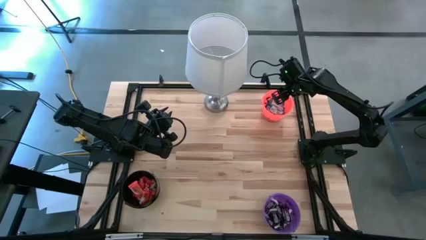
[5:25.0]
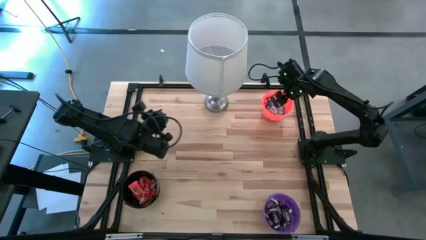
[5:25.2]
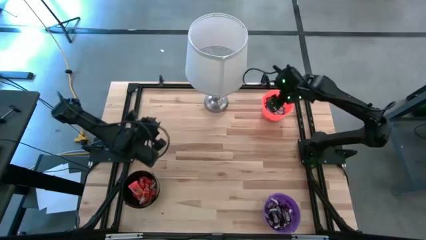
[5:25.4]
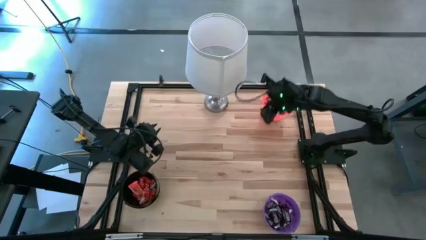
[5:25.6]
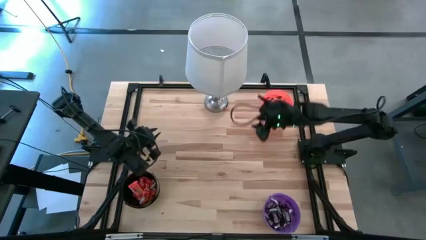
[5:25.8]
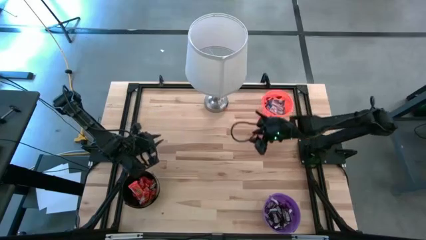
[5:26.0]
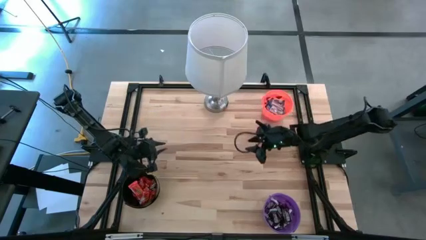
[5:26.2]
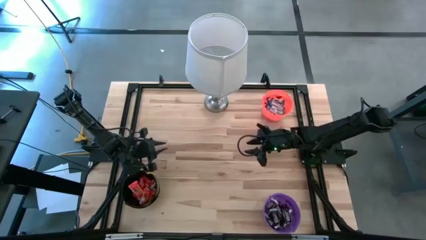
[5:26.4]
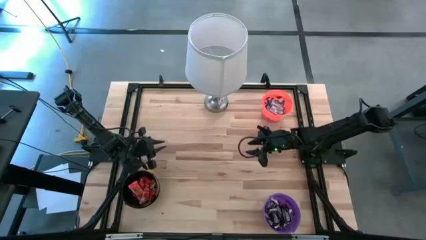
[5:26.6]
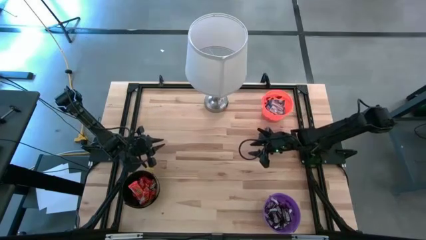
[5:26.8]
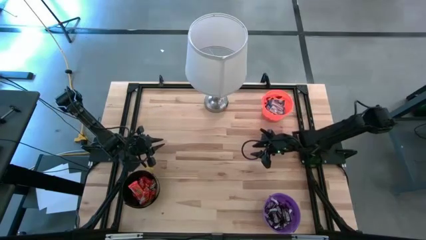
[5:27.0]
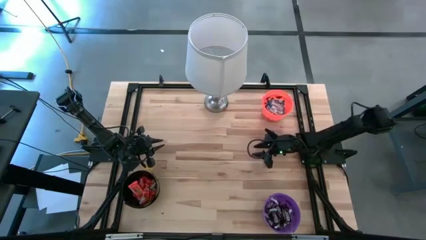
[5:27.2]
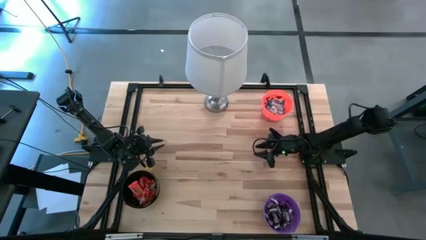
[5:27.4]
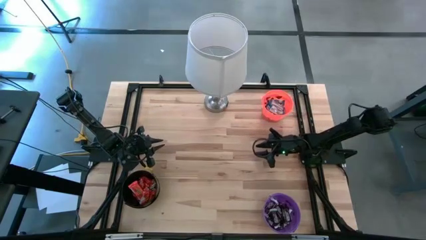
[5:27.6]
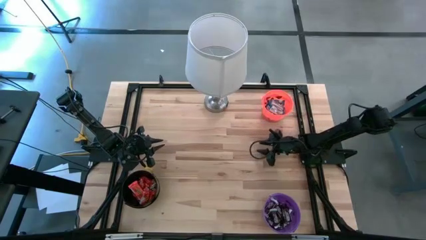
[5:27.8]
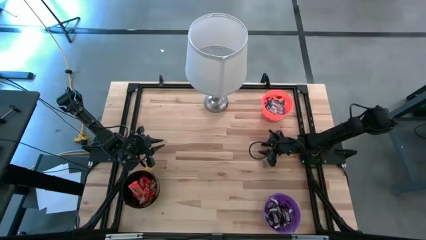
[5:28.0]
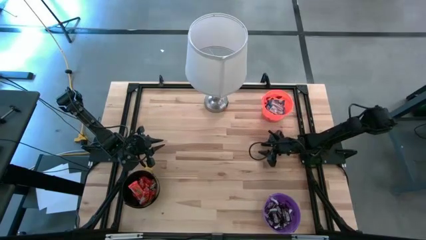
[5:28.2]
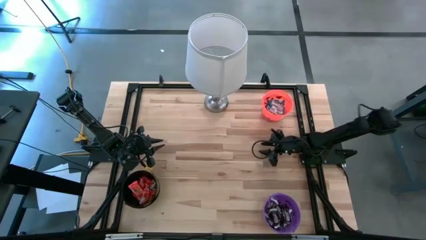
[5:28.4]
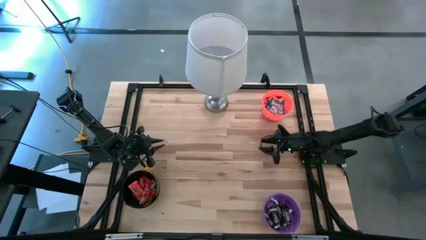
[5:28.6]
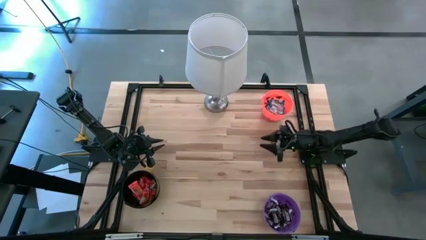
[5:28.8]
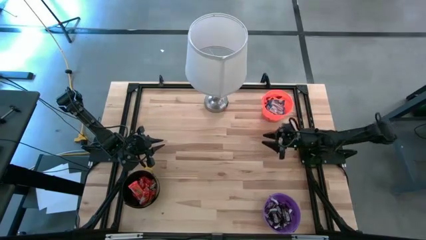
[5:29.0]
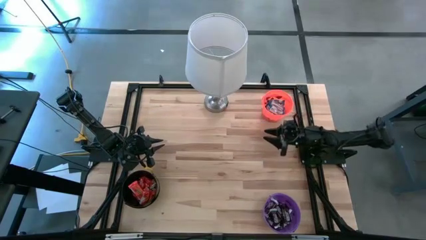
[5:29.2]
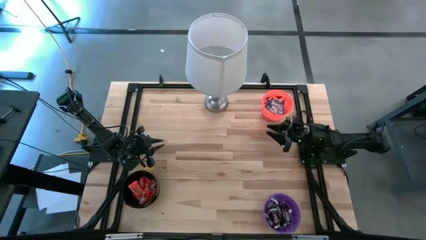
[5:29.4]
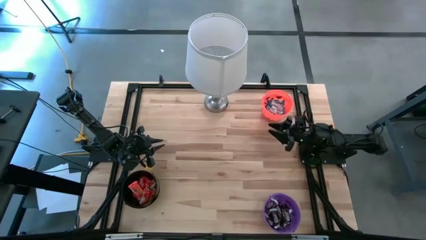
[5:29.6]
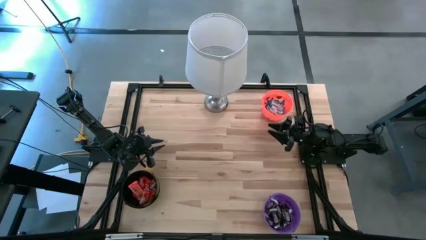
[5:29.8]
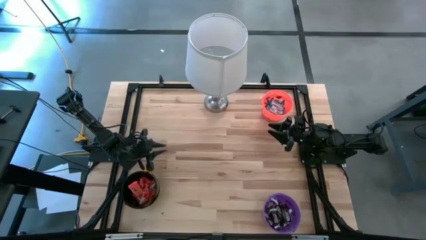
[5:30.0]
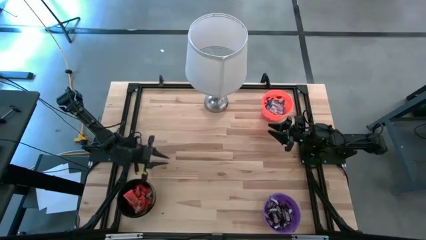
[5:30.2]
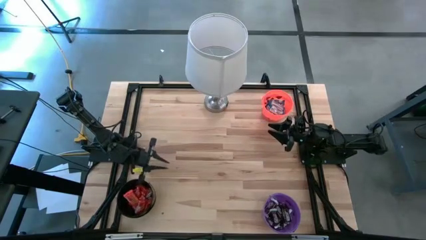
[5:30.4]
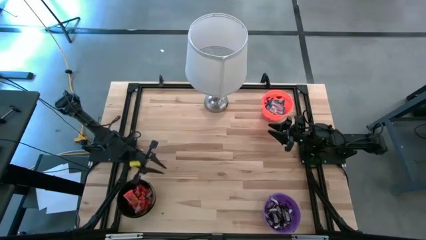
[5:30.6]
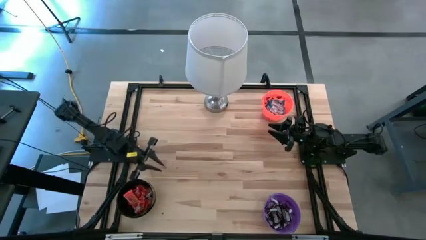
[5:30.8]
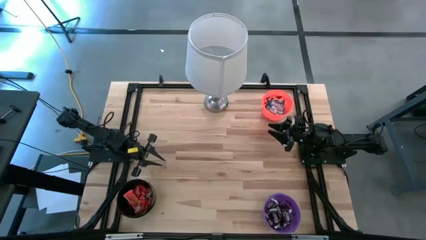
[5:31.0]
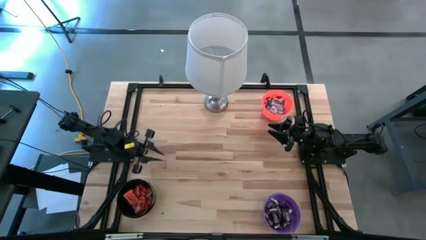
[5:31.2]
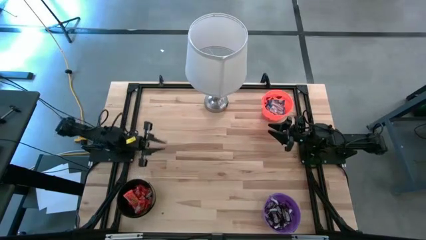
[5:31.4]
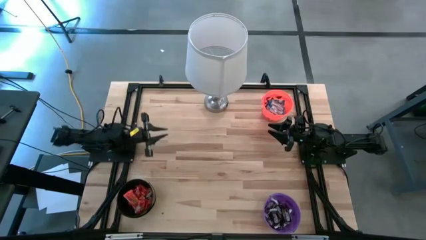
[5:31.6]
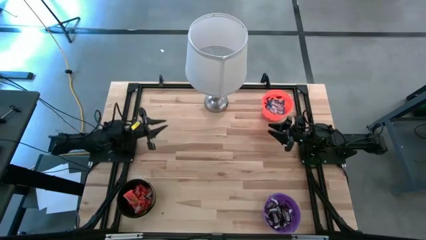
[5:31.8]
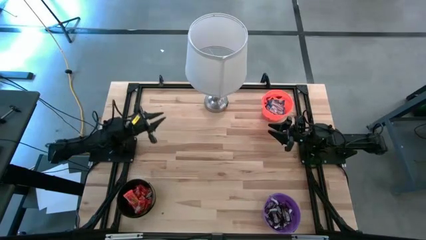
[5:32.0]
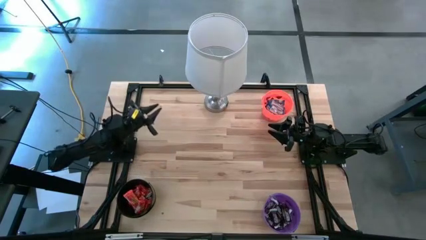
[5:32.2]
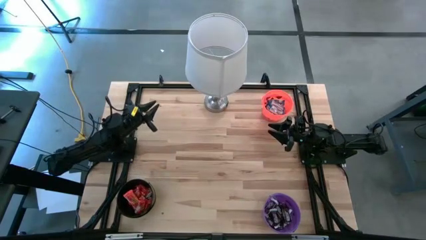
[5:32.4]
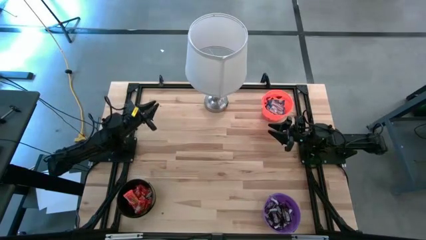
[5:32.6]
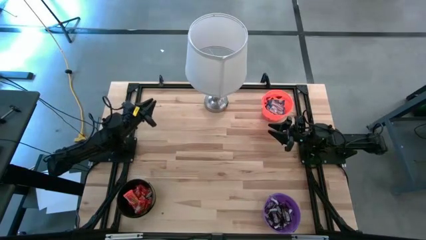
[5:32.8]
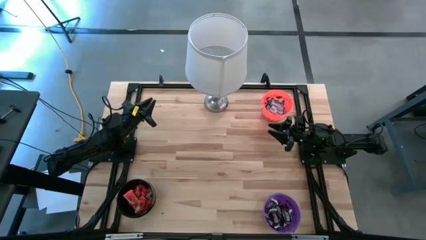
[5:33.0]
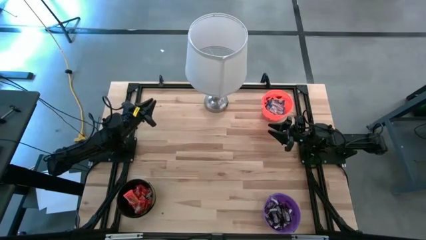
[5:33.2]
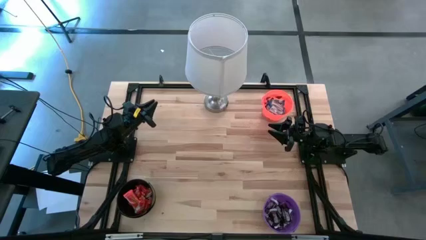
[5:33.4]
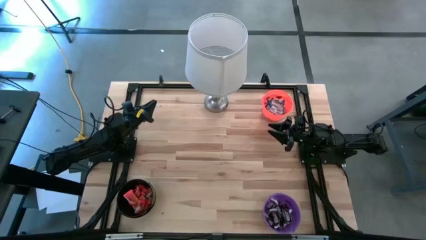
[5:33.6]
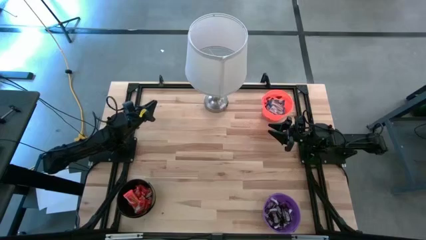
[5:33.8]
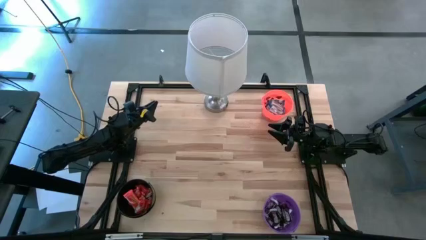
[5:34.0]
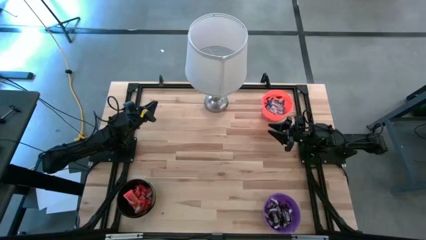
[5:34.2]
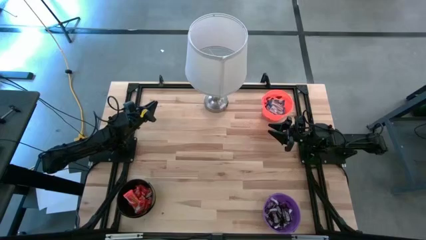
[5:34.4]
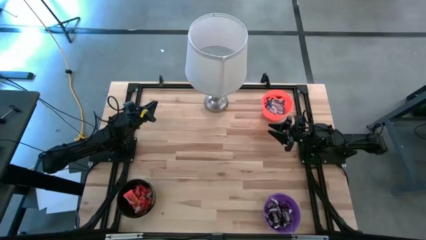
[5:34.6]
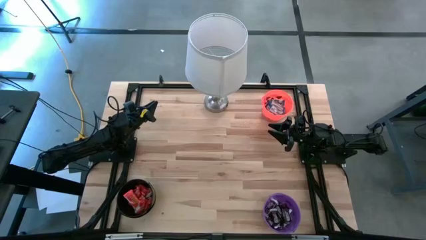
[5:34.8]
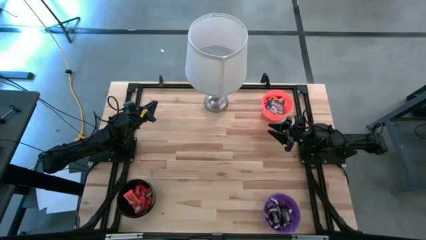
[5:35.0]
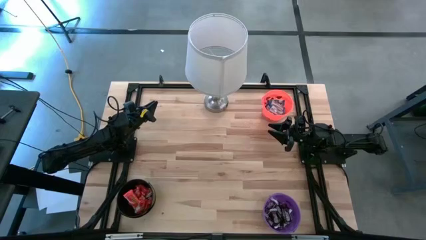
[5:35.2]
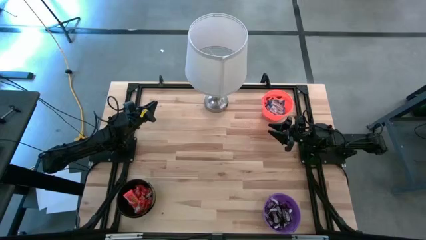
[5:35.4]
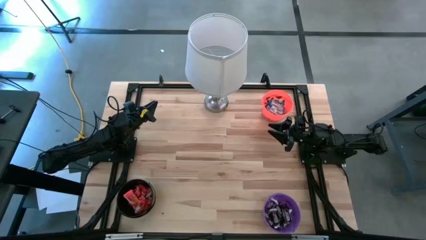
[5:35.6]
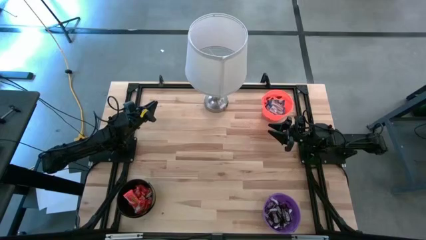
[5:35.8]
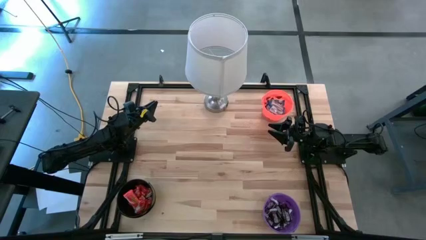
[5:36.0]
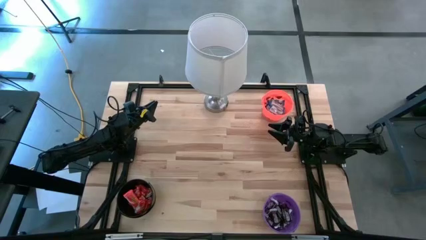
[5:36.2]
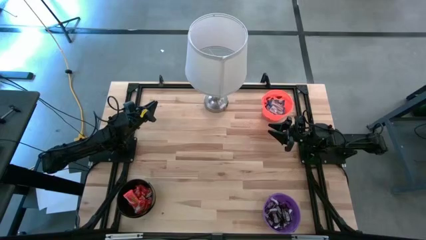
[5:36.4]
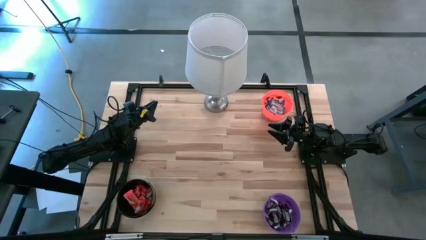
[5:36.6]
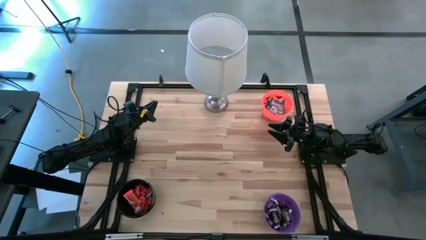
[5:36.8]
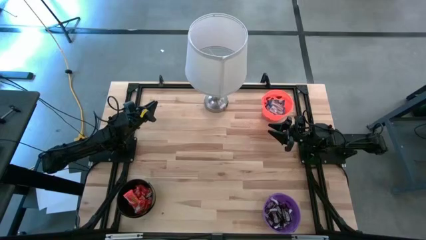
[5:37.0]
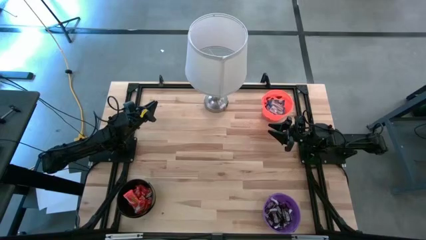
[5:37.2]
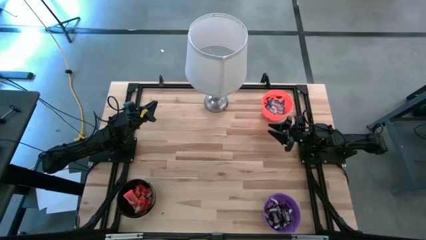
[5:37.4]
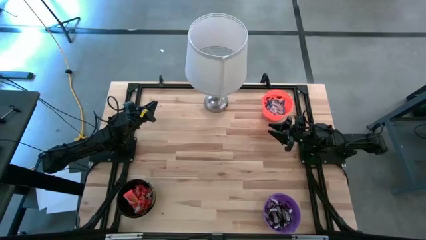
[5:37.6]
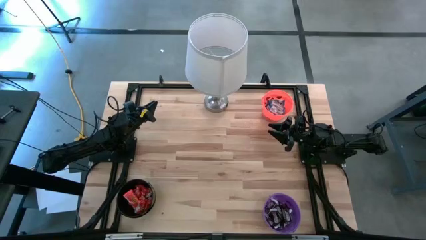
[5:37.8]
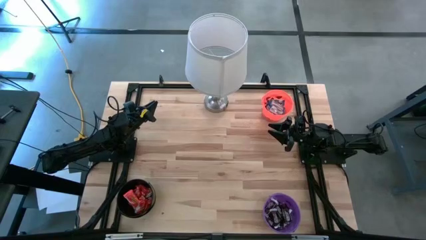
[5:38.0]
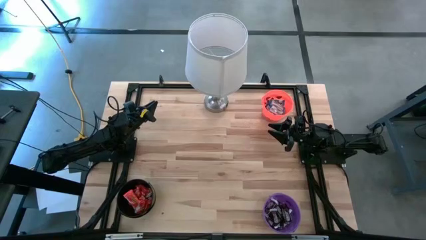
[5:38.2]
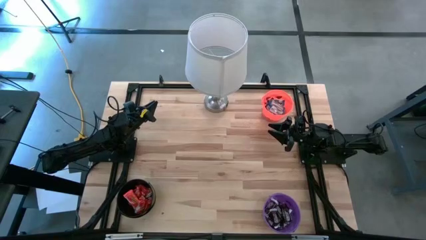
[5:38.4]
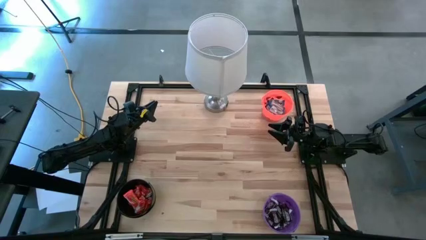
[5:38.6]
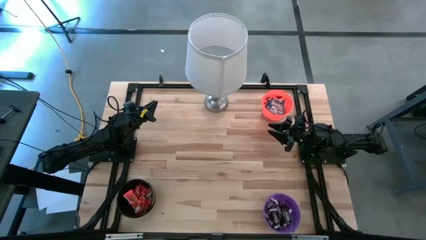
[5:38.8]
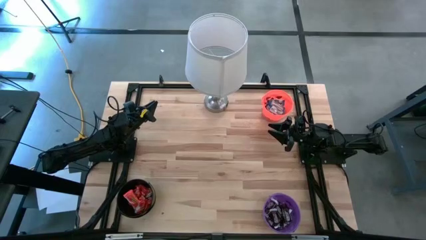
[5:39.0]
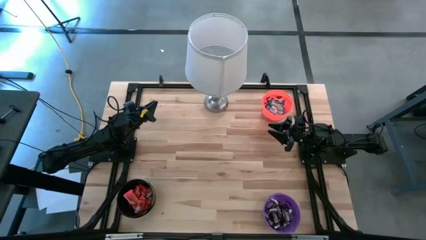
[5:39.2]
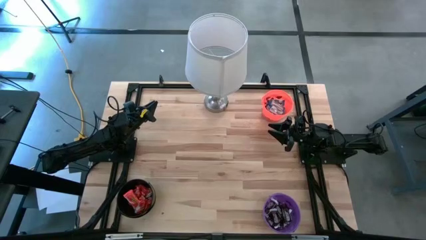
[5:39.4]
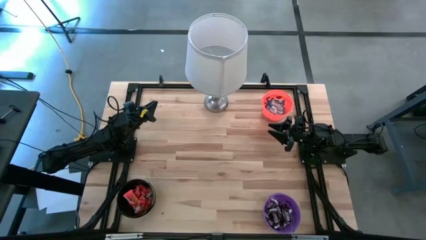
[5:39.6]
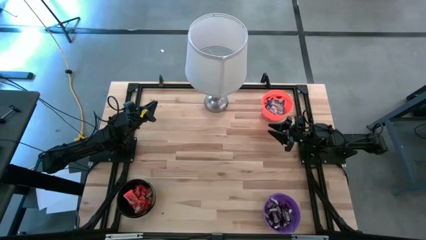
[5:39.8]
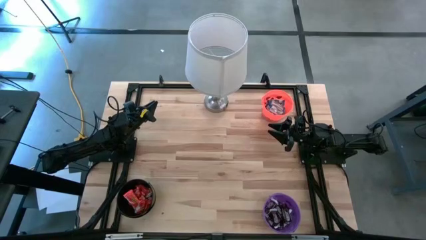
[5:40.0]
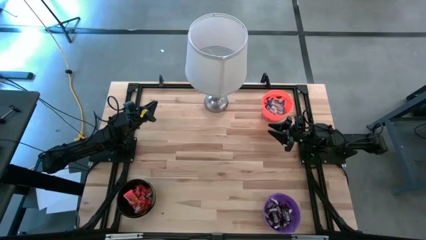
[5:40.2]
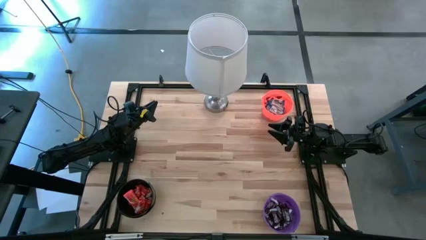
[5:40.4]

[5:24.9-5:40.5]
Task: Sort candy
Return to Home Position
